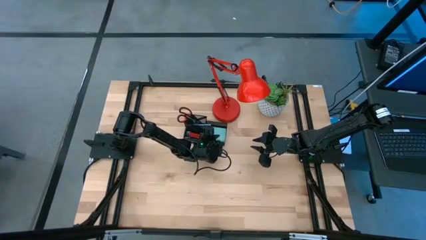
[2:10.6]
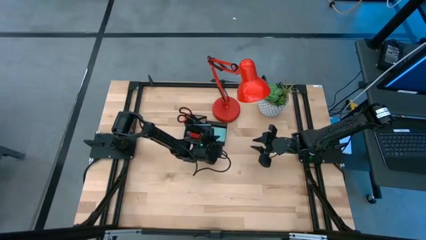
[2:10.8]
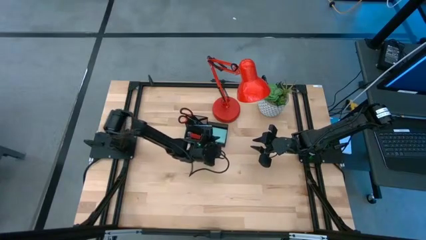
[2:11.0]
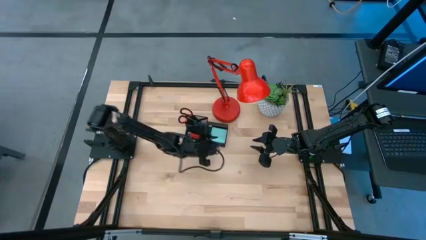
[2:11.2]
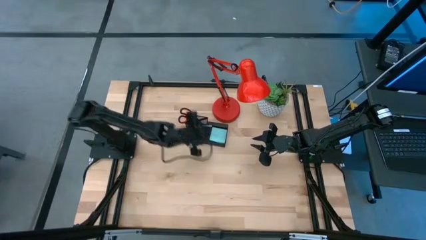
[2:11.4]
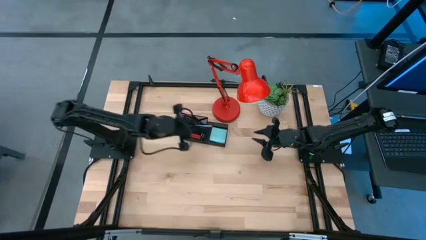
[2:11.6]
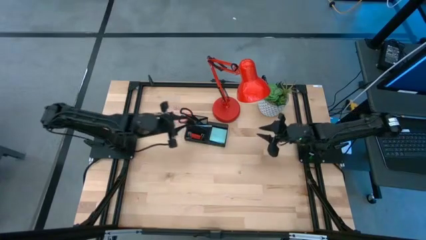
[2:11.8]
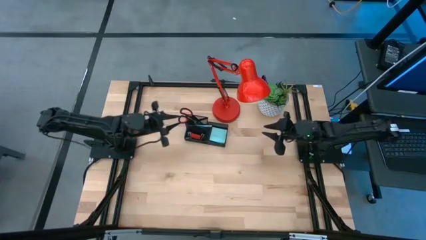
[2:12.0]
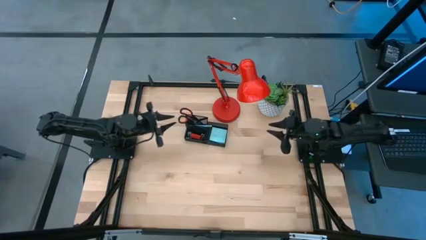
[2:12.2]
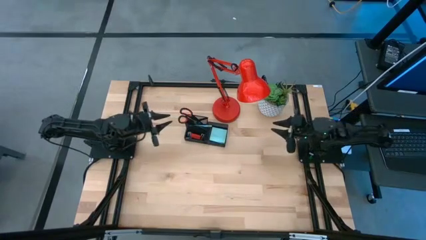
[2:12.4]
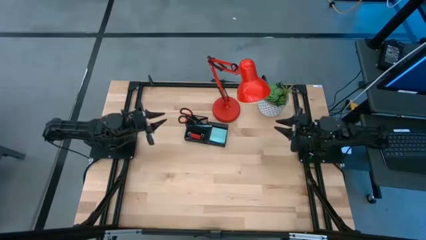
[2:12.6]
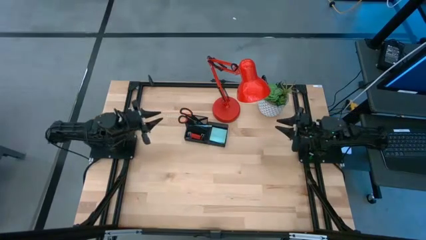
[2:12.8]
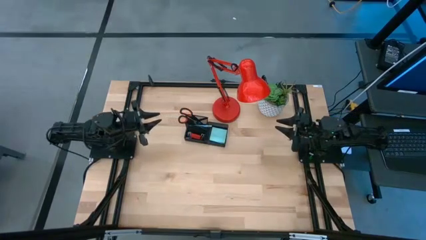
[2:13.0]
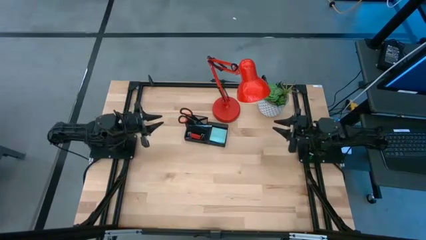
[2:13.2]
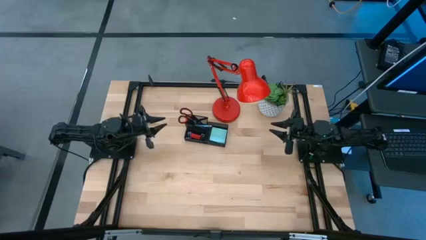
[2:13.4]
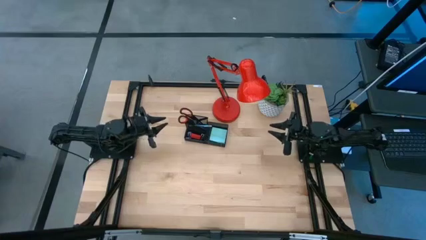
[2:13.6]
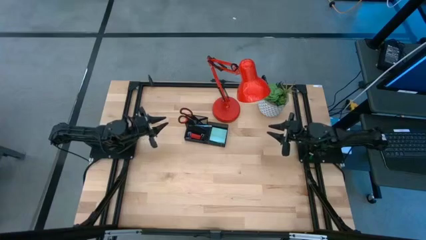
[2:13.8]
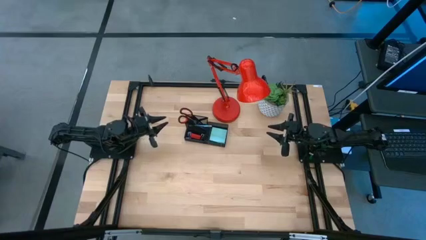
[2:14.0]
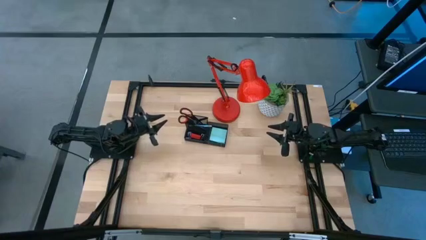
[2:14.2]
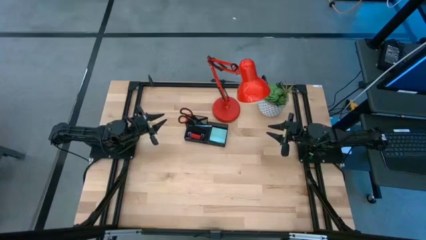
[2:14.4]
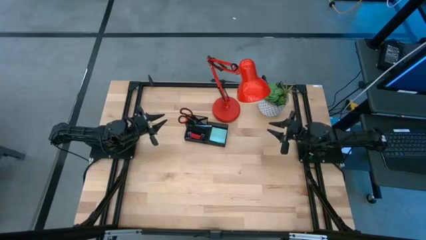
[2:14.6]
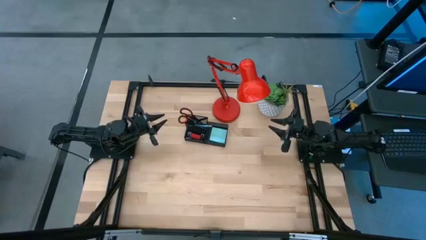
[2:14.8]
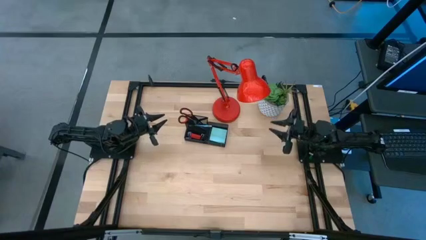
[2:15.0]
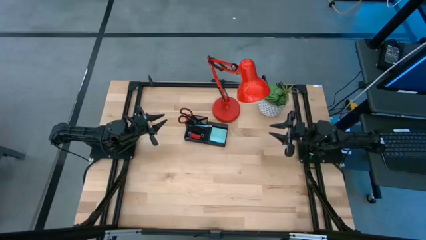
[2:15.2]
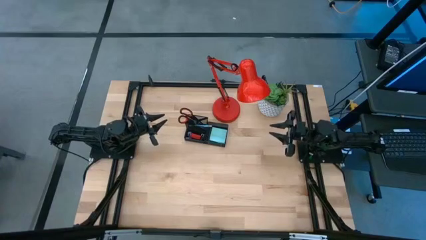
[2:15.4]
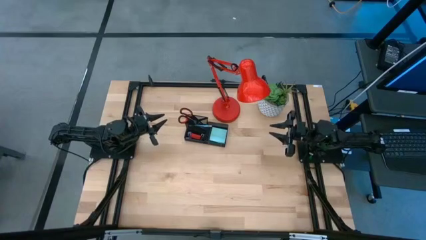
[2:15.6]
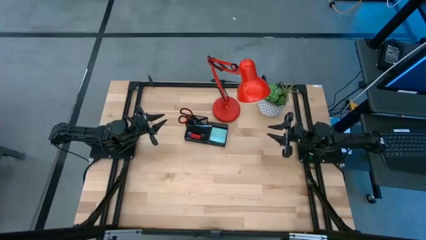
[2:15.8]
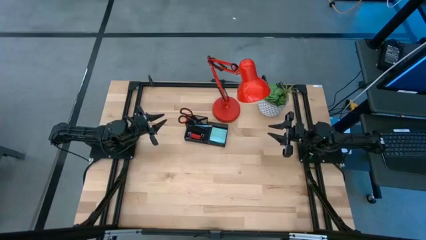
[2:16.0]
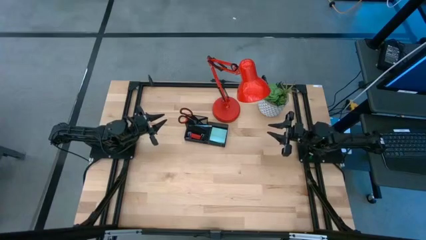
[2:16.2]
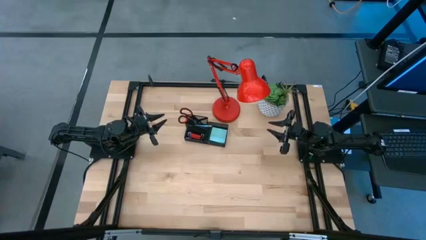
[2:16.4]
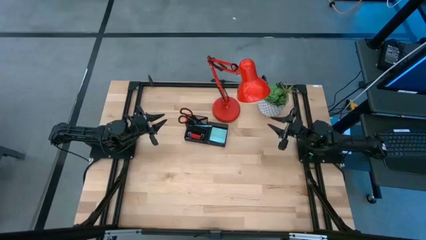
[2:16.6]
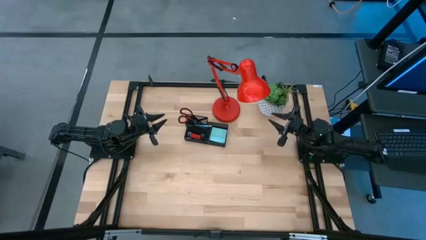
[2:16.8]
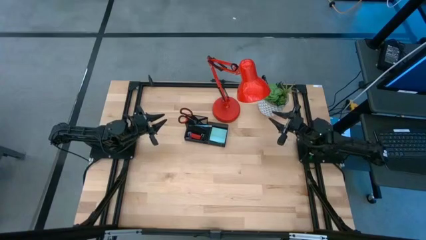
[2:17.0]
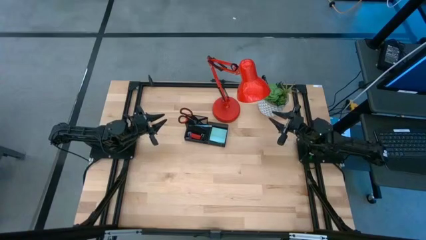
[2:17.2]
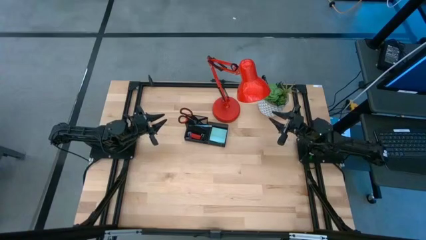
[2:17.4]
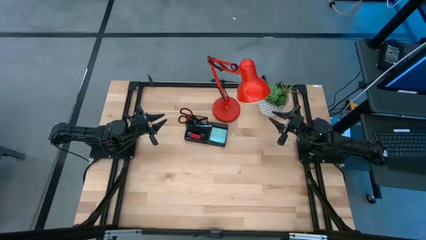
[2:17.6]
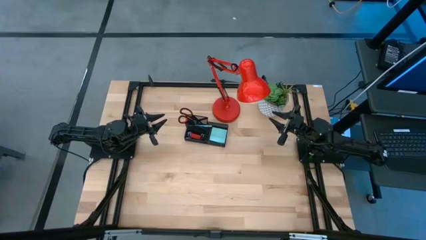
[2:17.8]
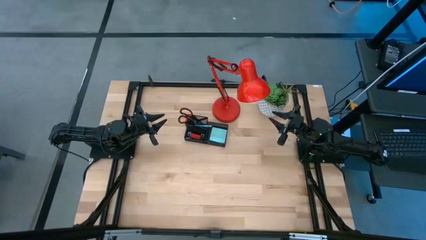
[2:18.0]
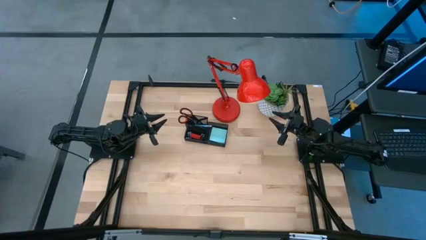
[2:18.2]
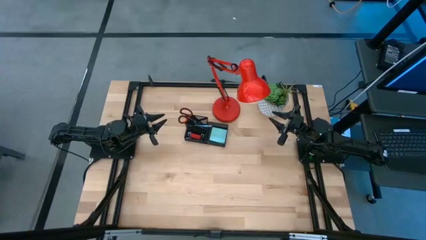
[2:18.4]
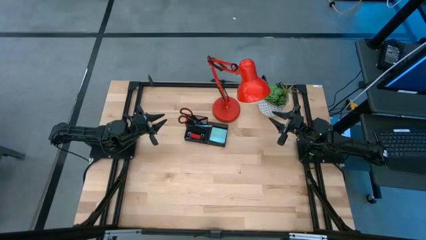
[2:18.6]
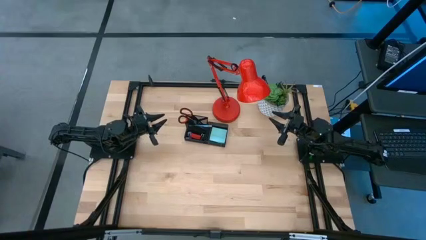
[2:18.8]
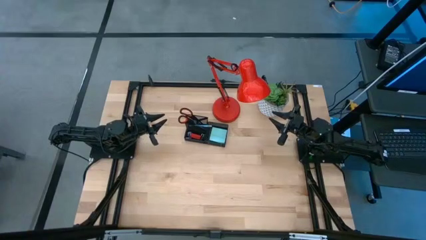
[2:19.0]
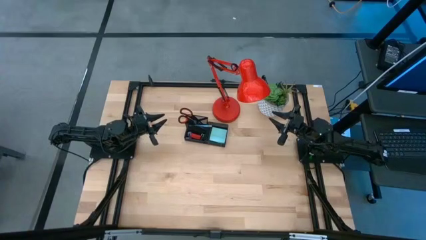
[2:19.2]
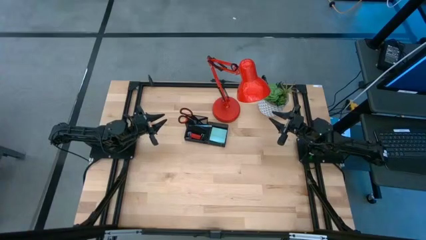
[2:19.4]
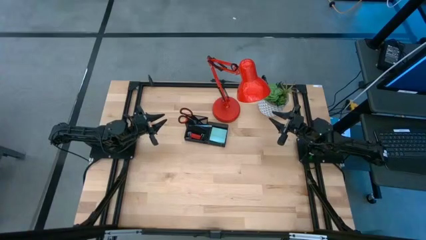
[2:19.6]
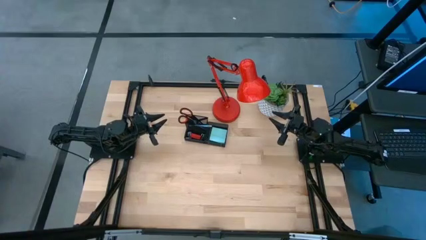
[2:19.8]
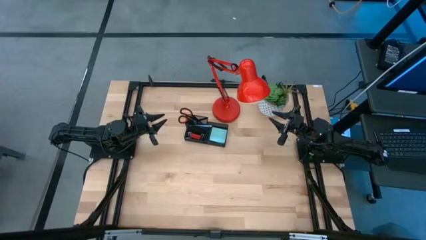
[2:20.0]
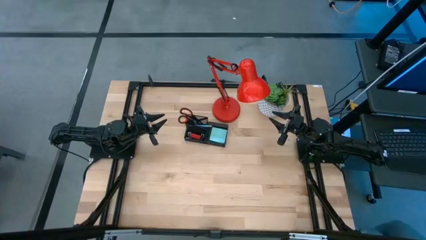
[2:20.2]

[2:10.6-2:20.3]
Task: Pick and place office supplies into organizer
Return to Home Position

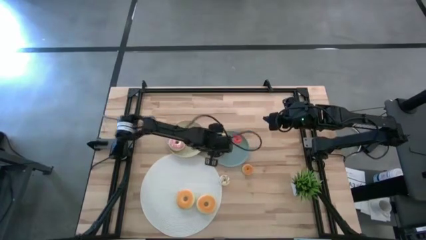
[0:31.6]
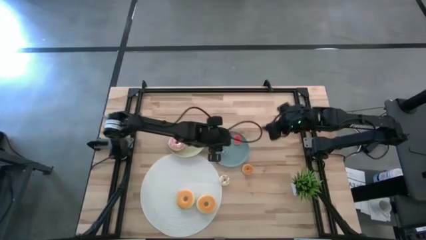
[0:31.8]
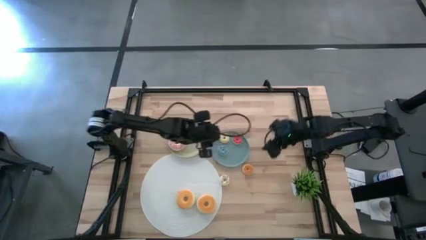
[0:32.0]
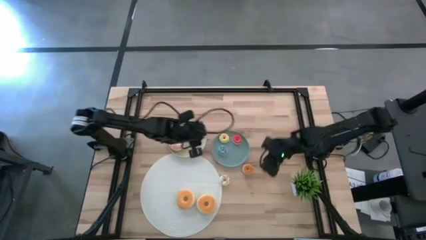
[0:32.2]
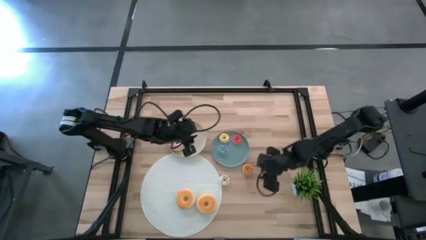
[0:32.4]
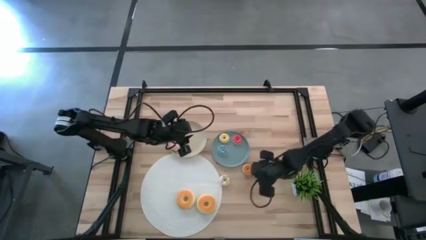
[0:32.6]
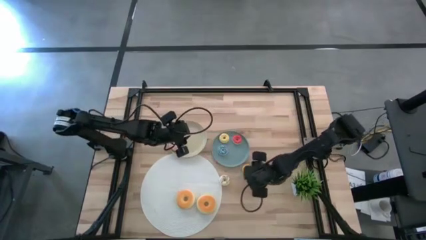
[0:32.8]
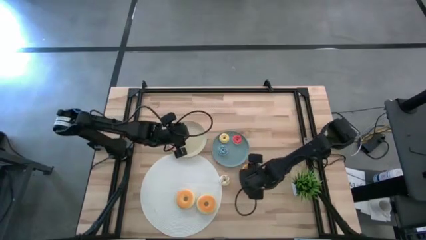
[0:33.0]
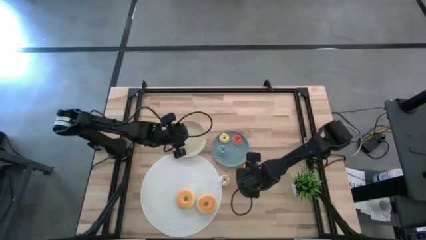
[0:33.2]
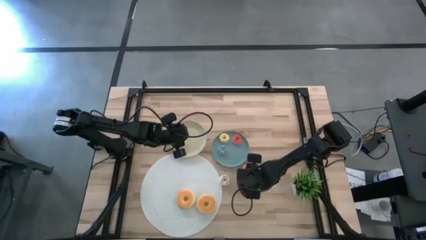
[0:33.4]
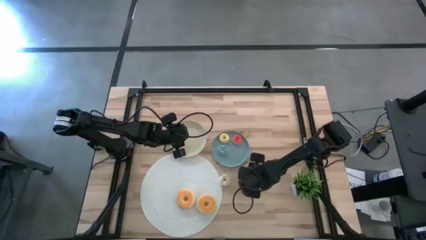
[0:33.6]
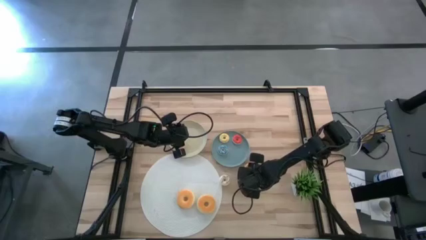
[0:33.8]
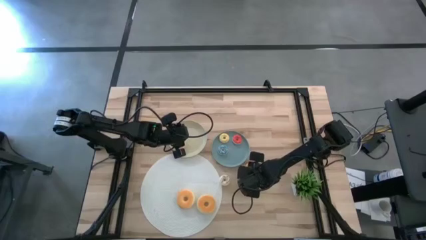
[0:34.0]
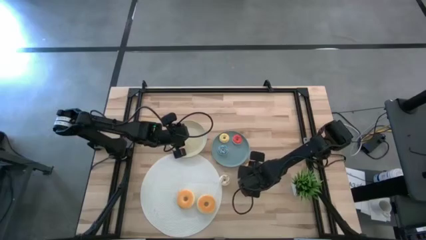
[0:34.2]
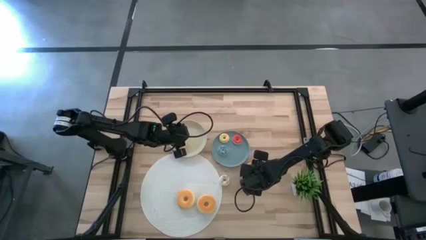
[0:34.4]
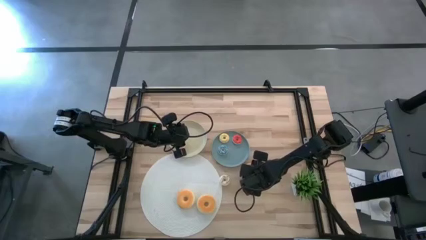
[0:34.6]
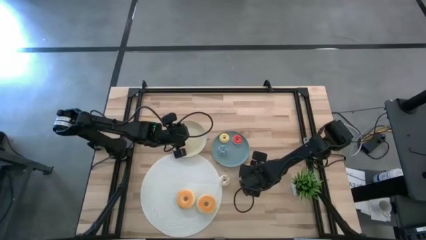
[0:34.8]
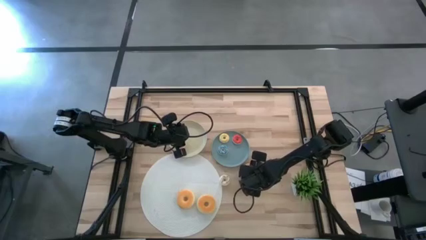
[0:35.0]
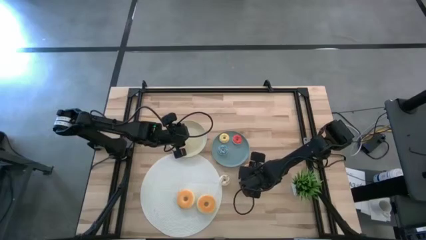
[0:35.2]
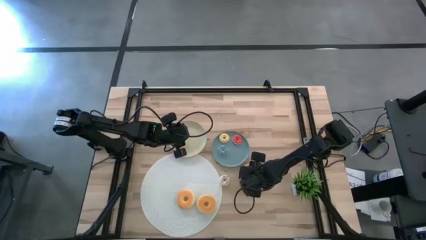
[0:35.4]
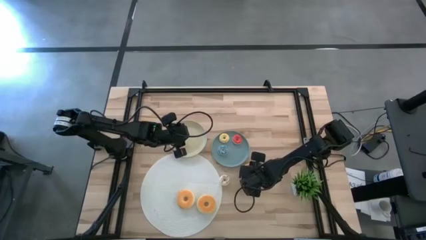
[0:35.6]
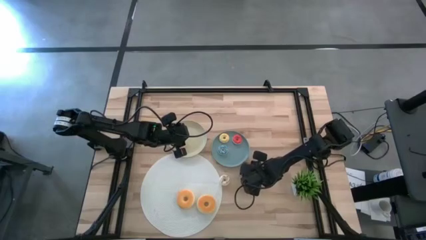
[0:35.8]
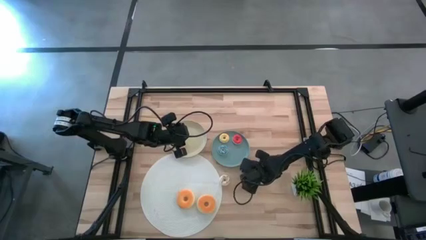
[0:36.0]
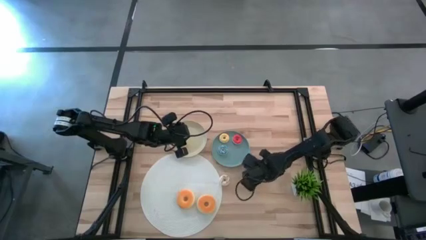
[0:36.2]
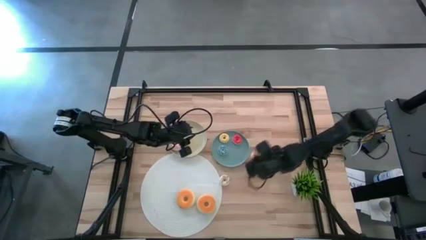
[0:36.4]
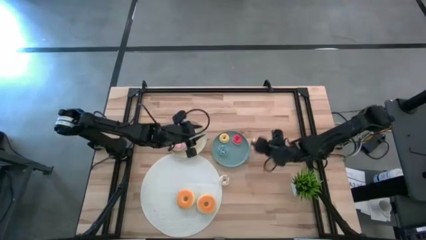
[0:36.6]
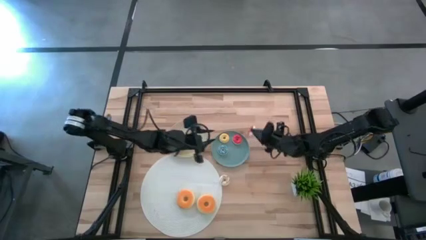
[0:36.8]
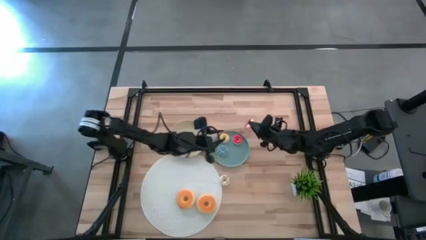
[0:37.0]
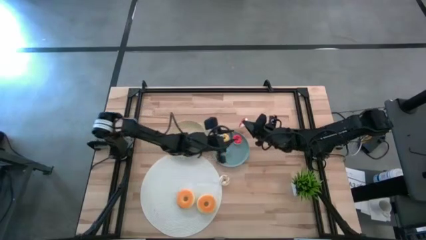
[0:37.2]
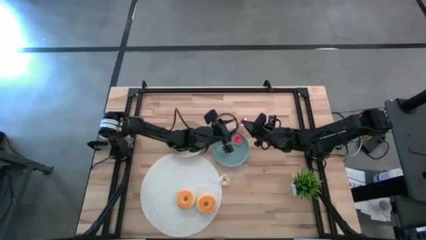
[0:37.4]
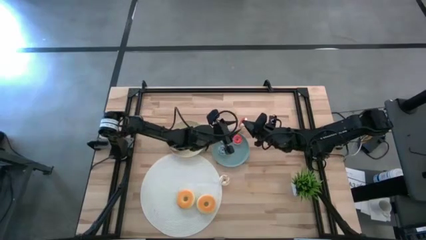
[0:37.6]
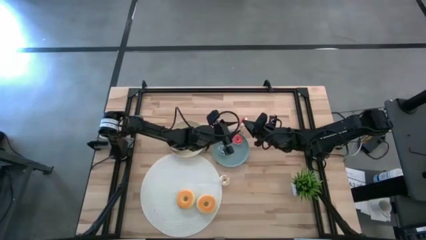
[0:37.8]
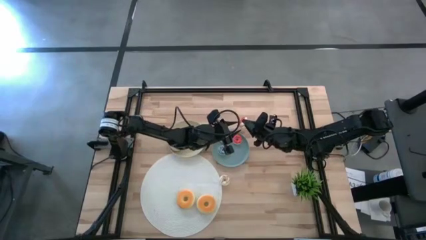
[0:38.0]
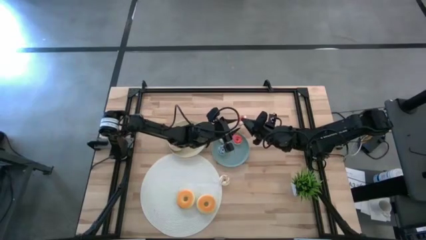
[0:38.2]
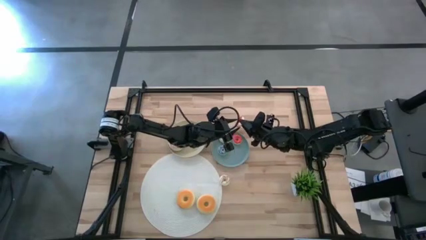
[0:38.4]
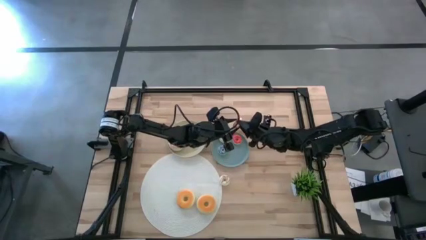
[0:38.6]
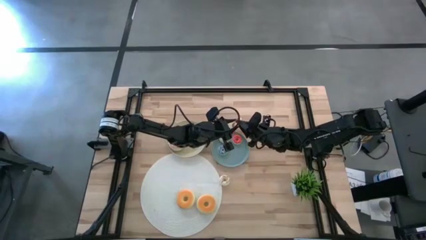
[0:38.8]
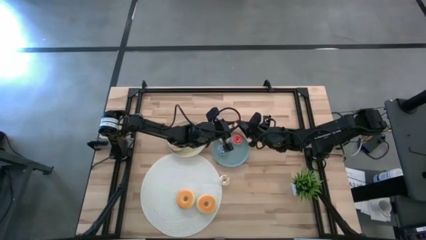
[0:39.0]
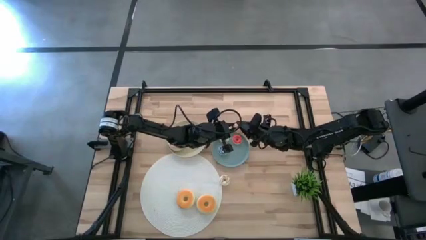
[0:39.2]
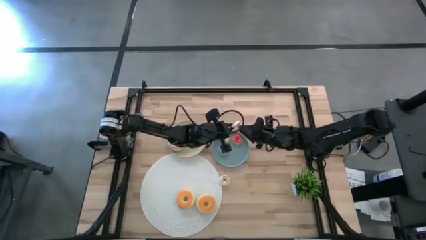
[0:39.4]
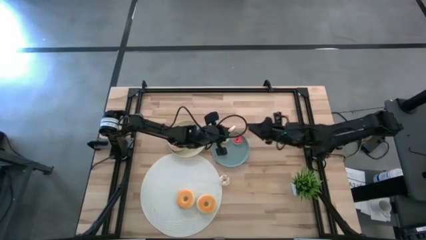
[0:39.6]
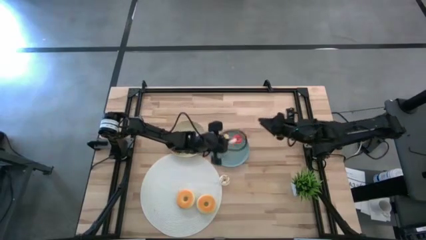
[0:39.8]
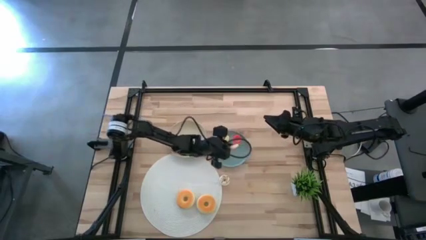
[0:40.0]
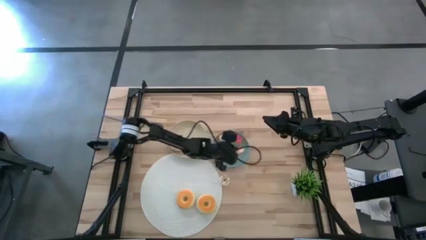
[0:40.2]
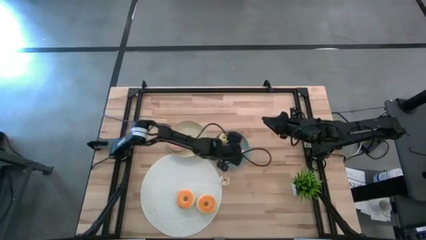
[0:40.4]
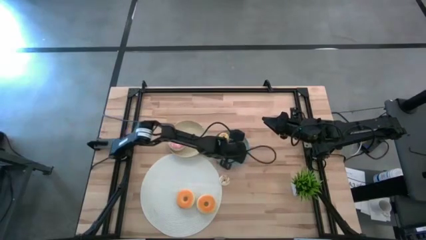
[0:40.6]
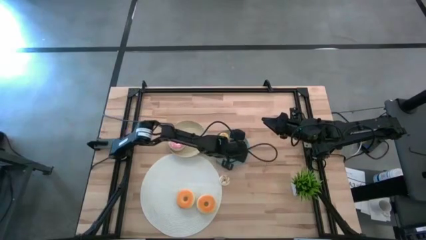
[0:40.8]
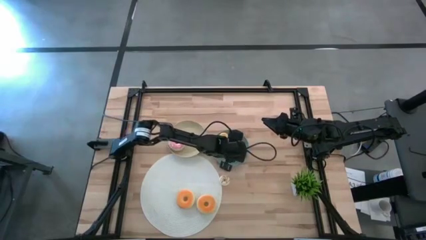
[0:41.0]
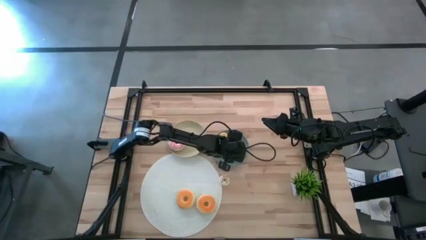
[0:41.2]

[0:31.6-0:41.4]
Task: Pick & Place donuts
Put the small orange donut on the blue plate
